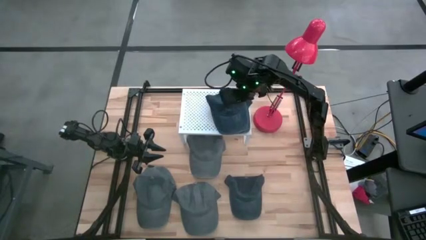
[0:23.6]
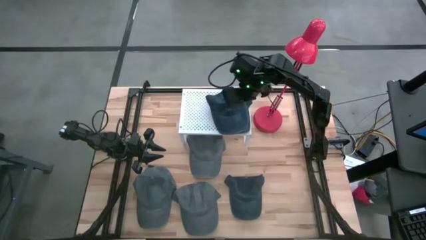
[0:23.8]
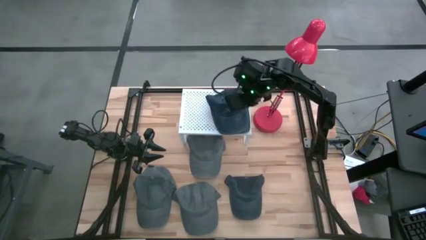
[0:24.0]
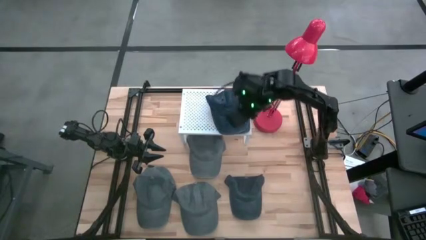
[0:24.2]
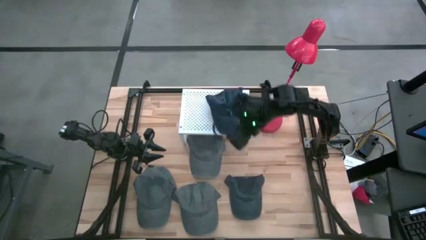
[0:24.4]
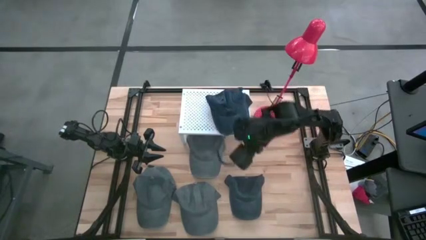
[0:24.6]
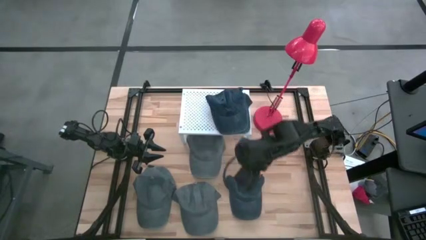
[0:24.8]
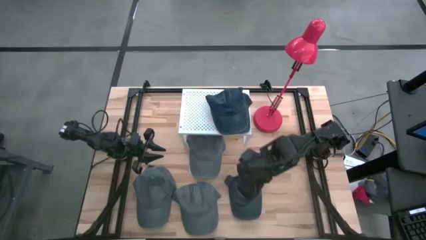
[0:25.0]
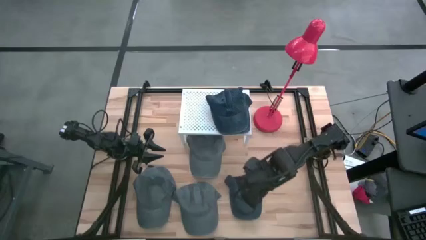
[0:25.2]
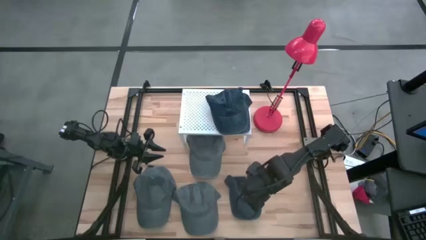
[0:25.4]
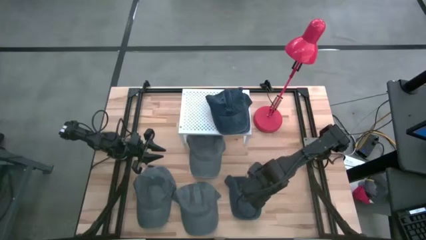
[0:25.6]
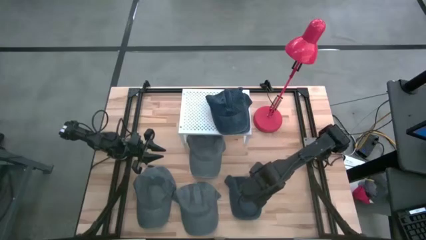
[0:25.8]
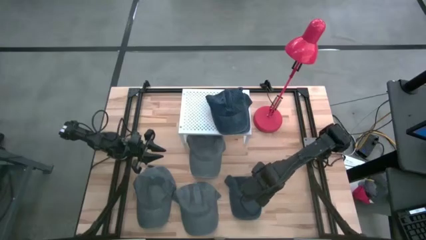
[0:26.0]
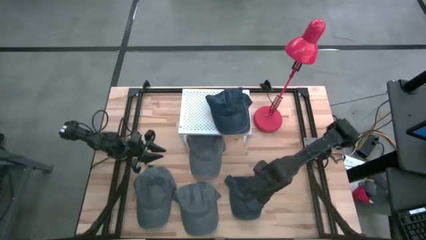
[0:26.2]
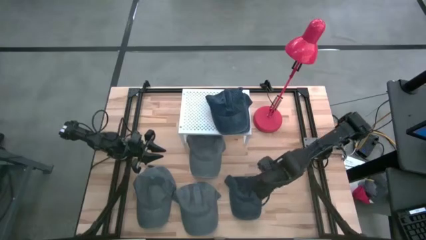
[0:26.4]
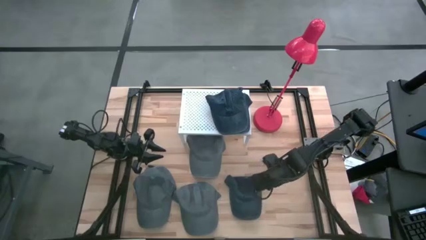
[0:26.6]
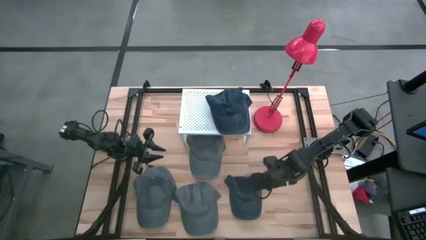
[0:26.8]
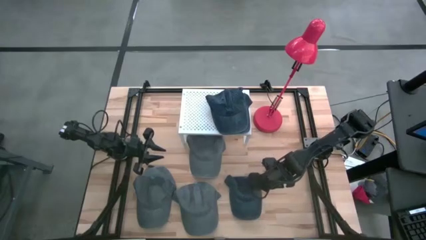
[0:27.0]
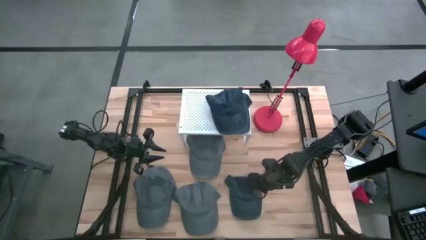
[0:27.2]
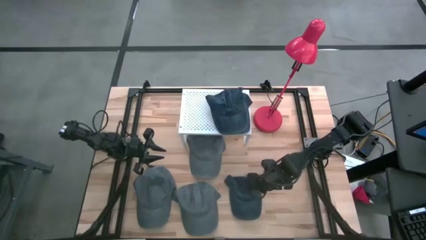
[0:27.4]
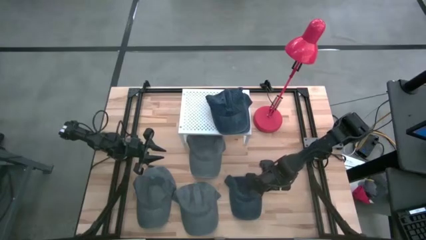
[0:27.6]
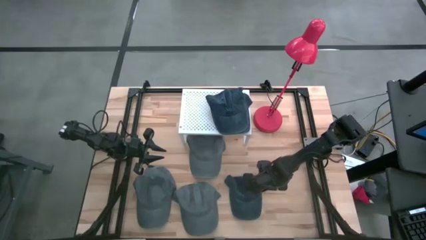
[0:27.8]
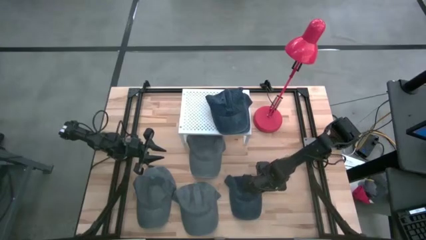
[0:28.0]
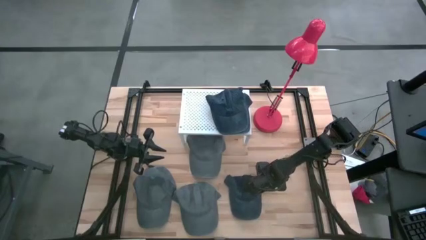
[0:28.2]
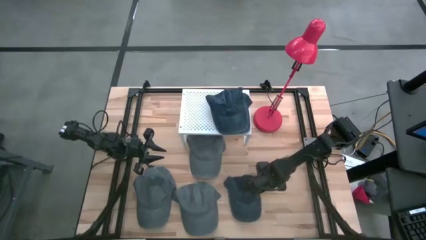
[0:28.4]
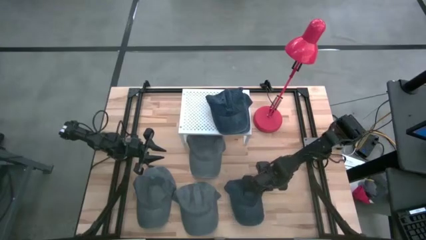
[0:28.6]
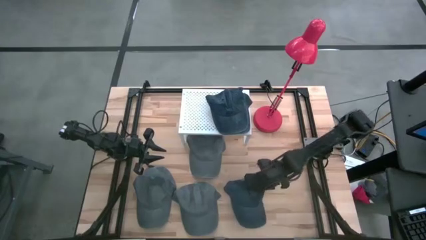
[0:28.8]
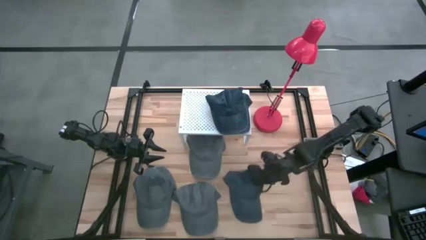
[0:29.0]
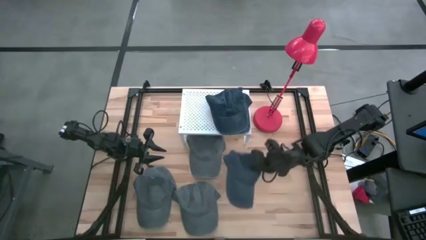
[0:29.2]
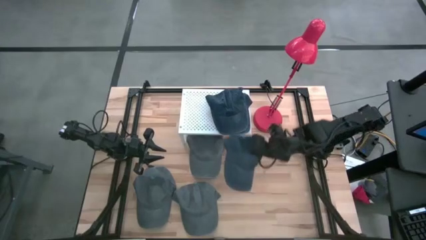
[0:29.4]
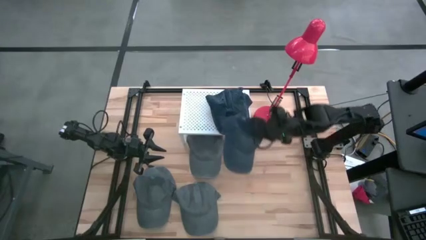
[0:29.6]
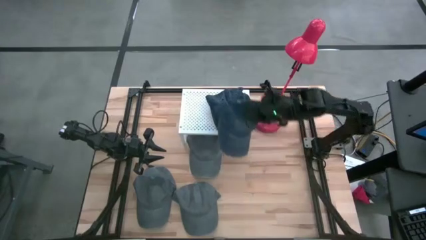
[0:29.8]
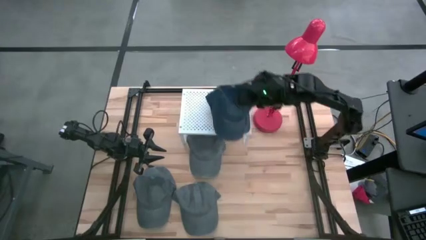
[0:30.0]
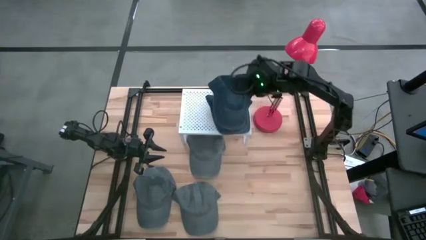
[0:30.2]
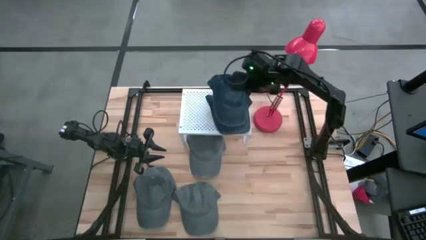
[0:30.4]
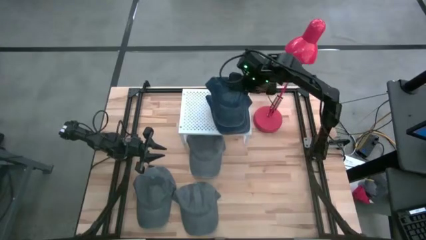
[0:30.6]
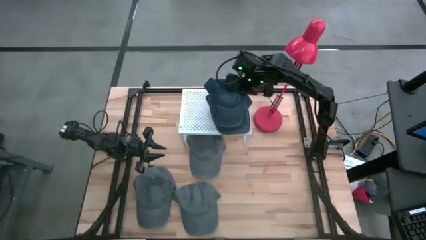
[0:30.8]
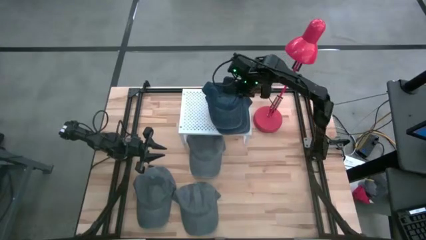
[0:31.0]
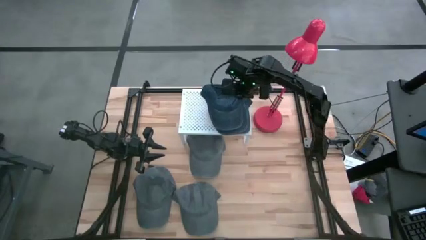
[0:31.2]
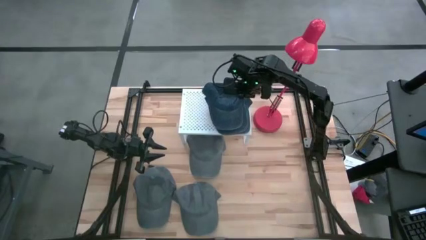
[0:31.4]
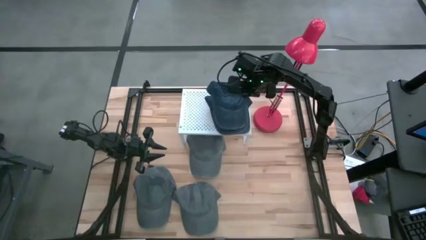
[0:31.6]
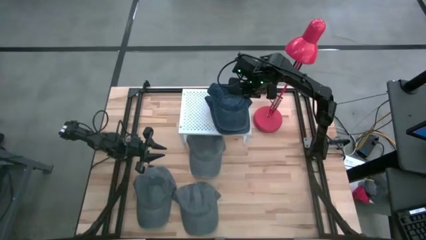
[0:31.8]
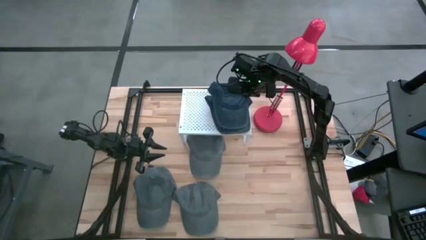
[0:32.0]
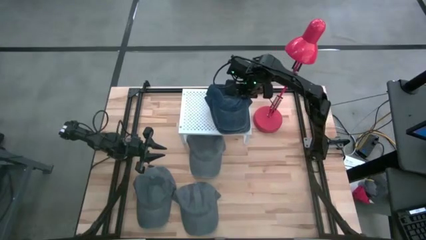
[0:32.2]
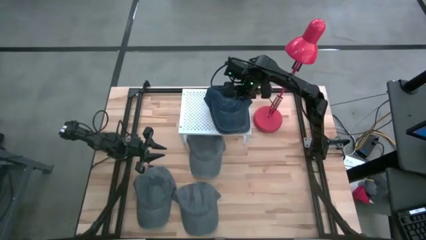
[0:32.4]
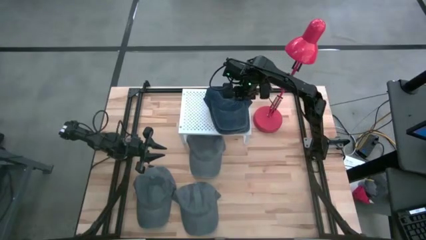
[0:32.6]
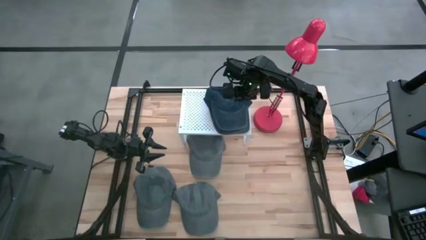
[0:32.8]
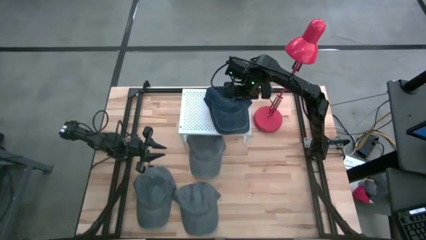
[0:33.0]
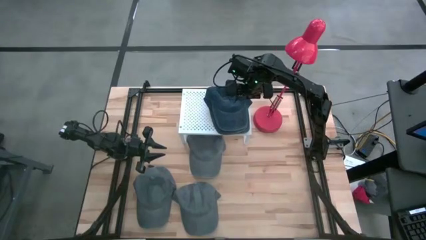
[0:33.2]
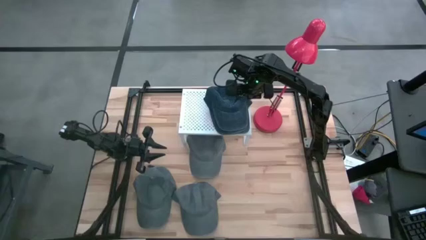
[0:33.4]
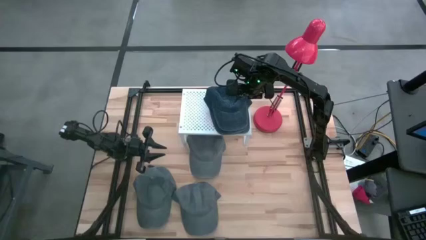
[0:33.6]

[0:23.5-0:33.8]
Task: Pick & Place hat
Stack the black cap on top of the black cap on the shelf

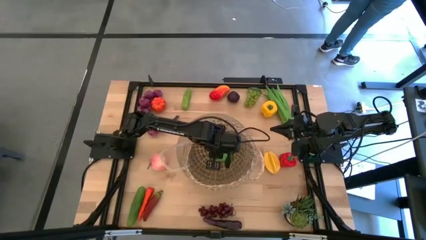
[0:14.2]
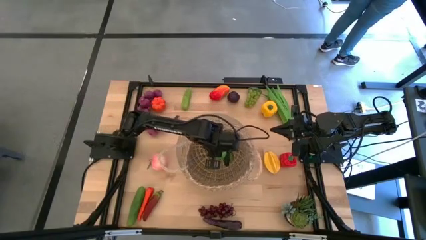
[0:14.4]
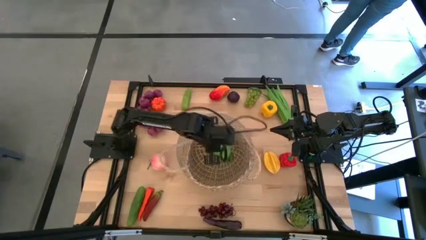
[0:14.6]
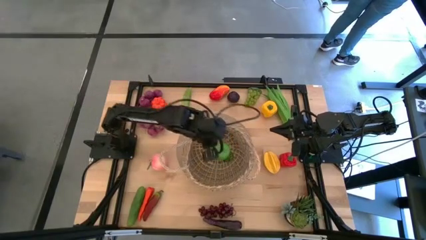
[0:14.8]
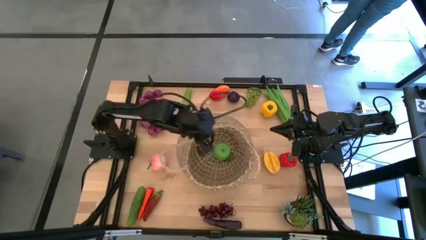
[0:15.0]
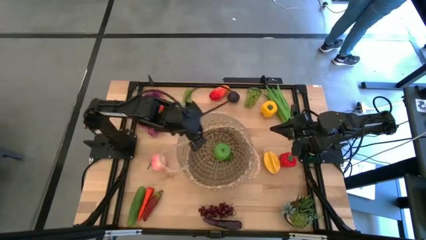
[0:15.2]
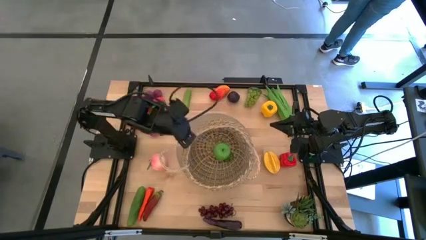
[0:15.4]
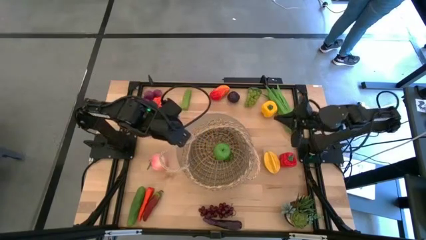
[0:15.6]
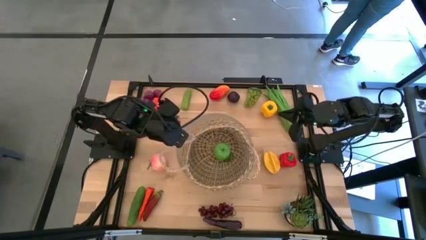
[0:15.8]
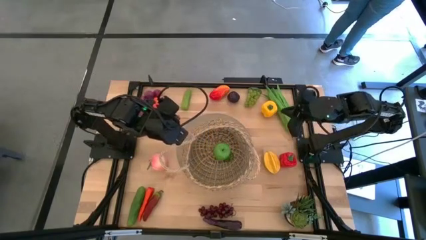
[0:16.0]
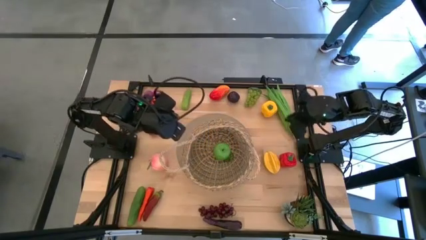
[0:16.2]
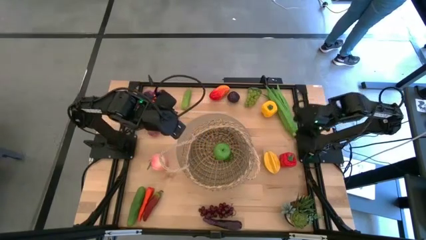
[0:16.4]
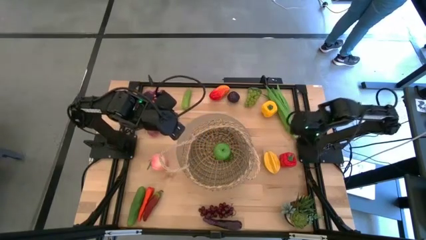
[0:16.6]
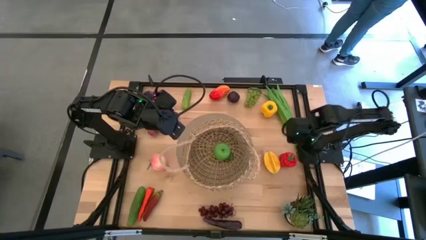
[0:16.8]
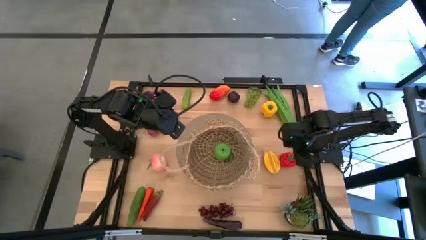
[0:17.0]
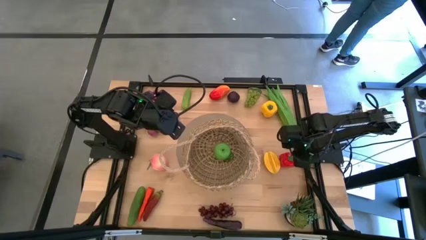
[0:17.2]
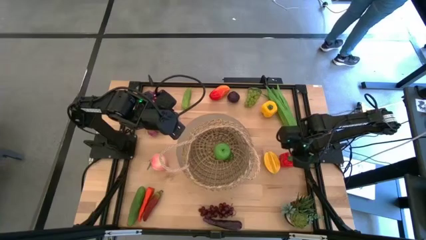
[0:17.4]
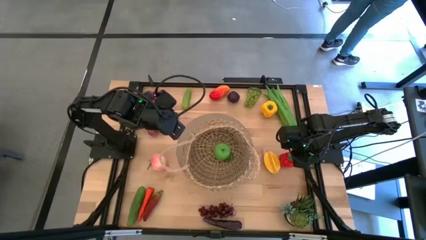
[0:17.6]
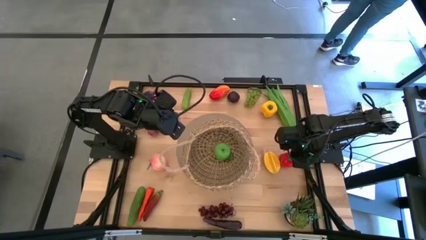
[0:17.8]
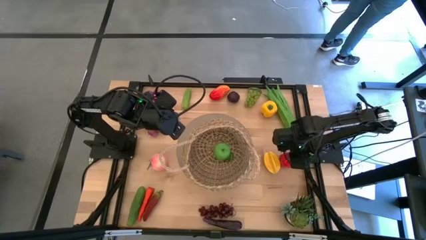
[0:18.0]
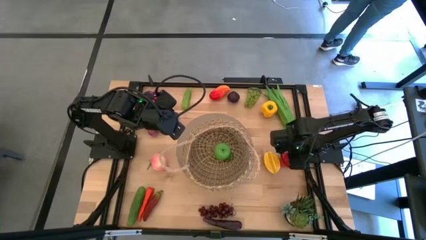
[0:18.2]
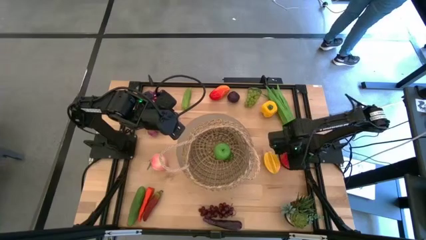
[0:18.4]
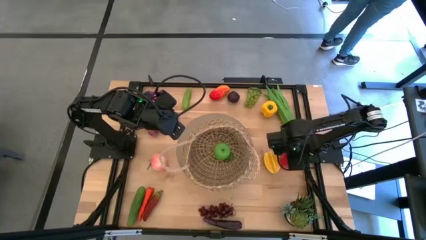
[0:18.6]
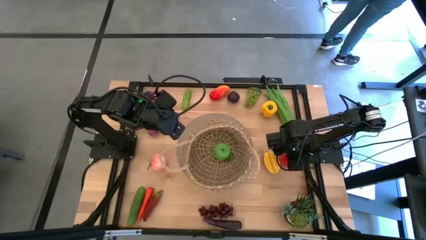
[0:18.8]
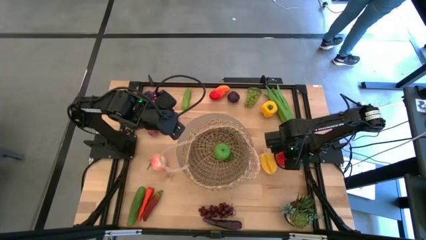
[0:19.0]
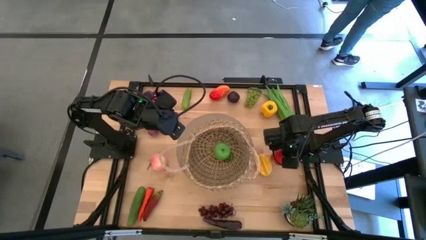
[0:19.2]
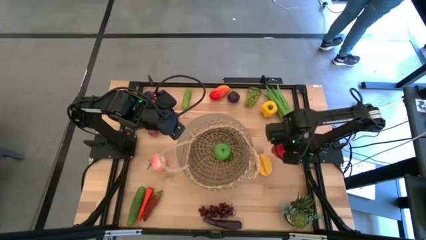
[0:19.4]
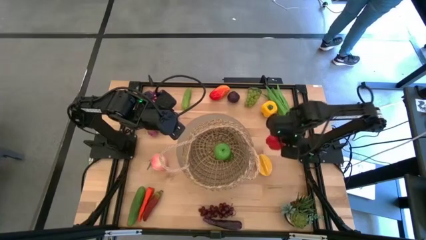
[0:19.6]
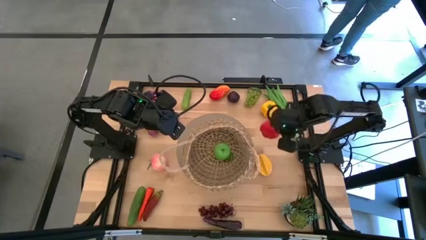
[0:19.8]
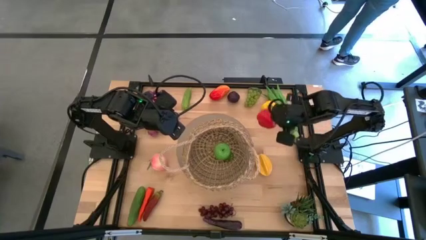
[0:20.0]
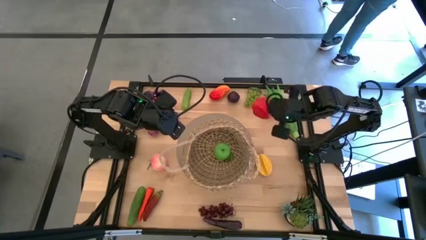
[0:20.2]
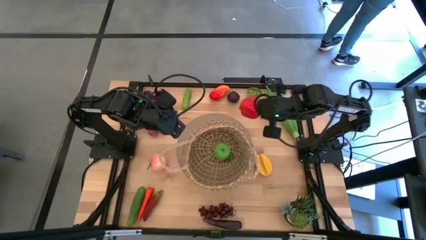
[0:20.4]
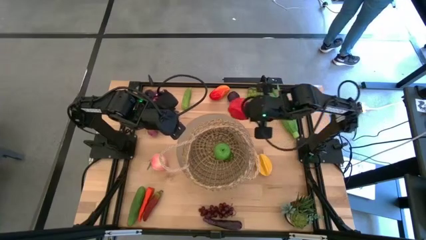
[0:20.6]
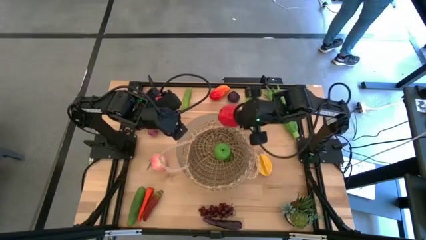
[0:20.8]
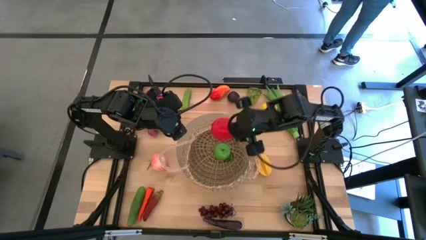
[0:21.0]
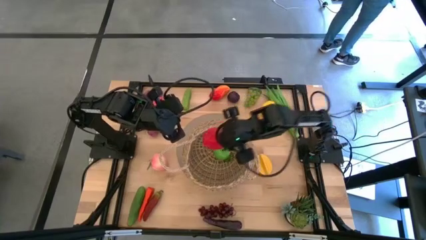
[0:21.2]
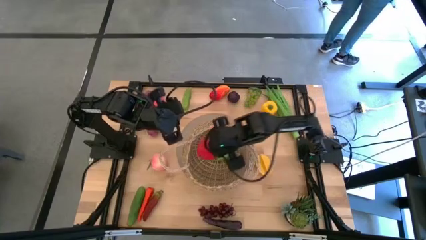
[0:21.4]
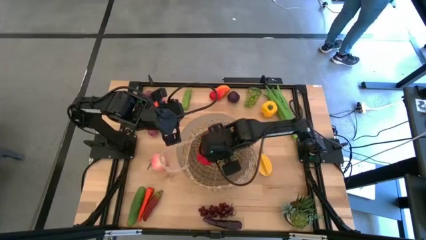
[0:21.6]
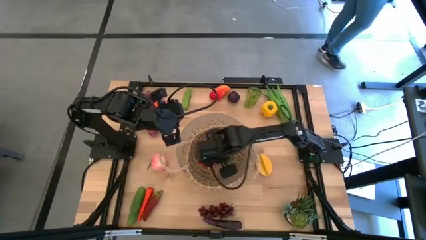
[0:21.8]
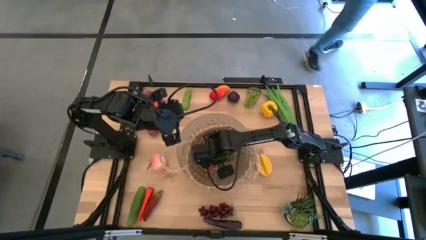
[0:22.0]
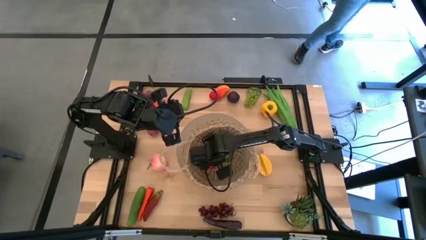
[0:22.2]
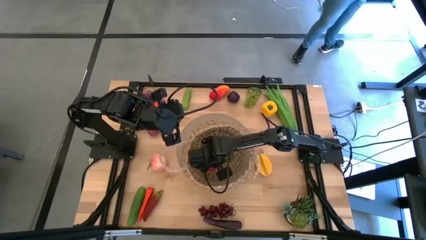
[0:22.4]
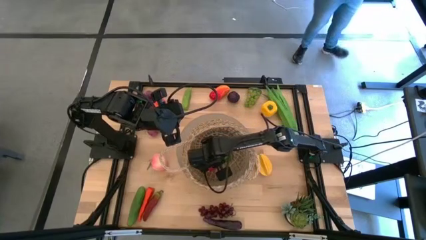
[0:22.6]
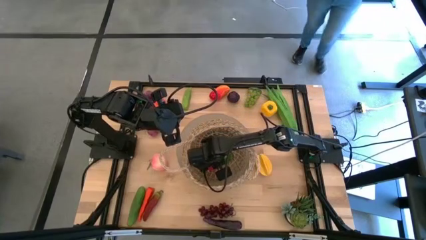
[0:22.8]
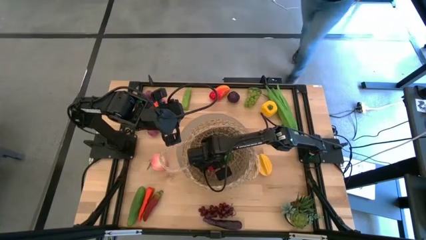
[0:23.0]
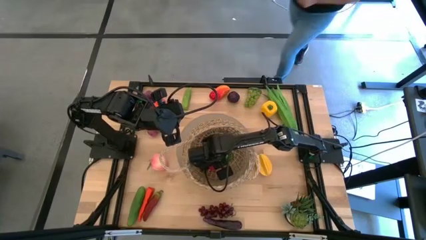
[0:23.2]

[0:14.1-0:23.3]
Task: Build produce basket
Put the red bell pepper into the brown basket
